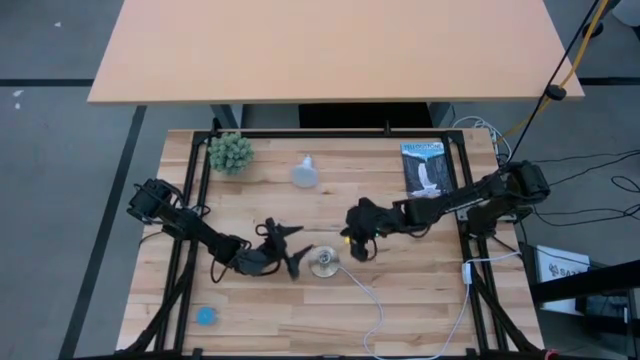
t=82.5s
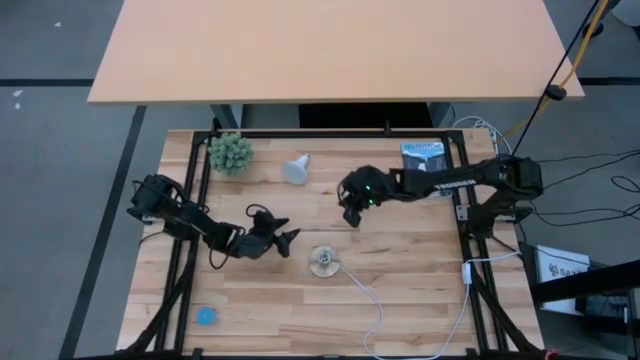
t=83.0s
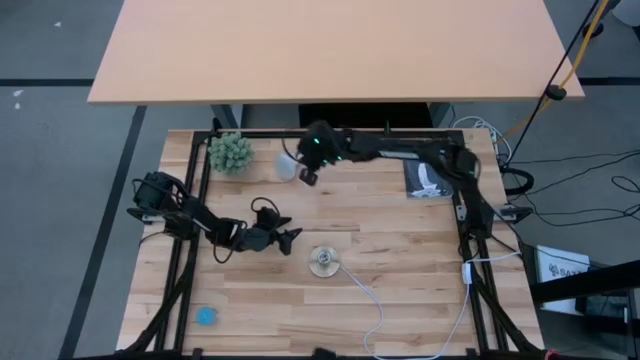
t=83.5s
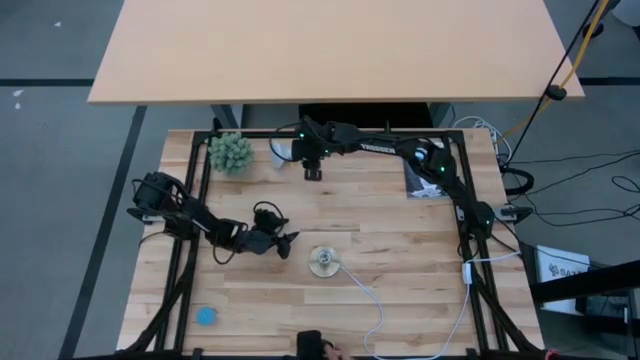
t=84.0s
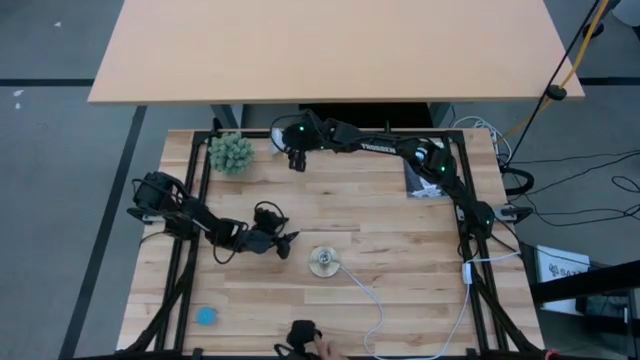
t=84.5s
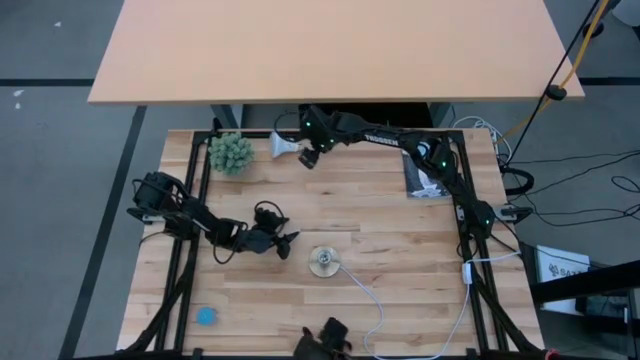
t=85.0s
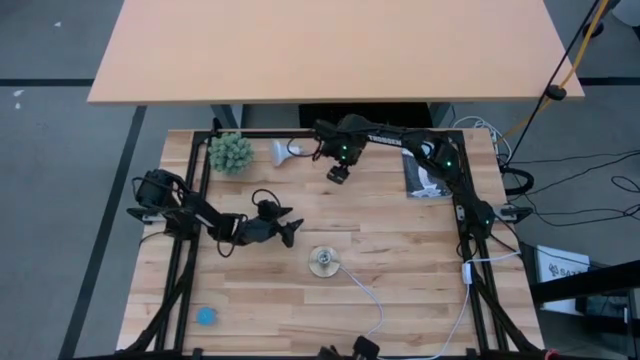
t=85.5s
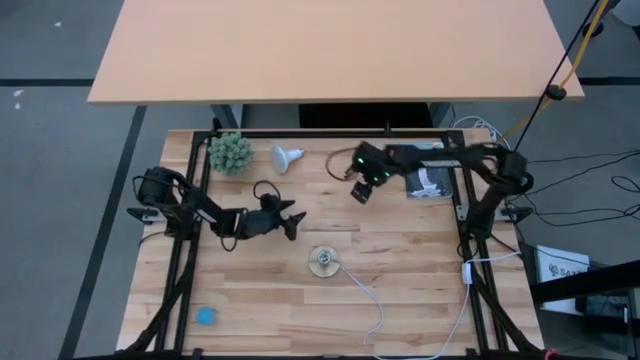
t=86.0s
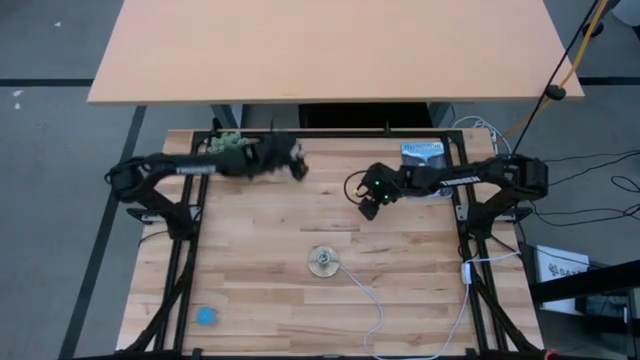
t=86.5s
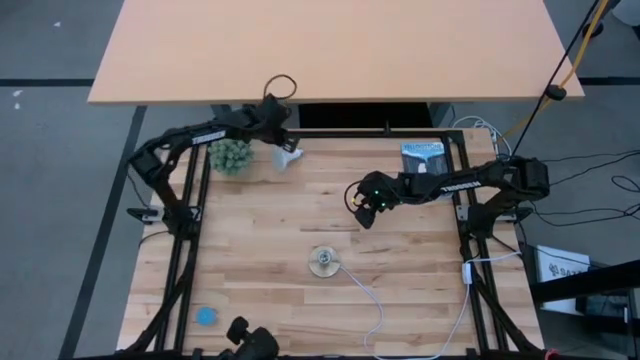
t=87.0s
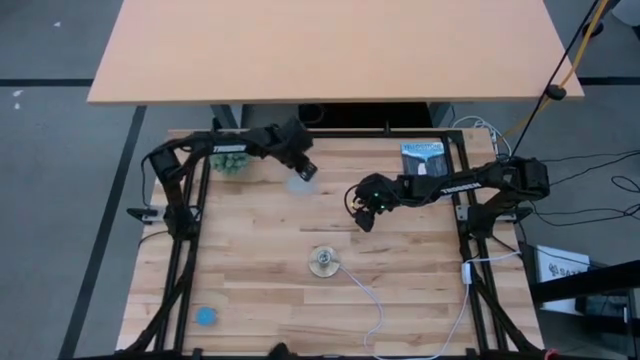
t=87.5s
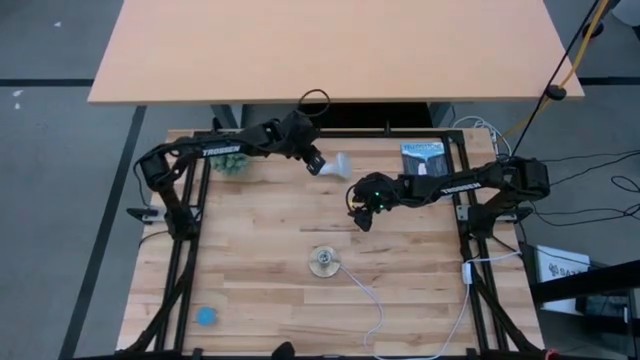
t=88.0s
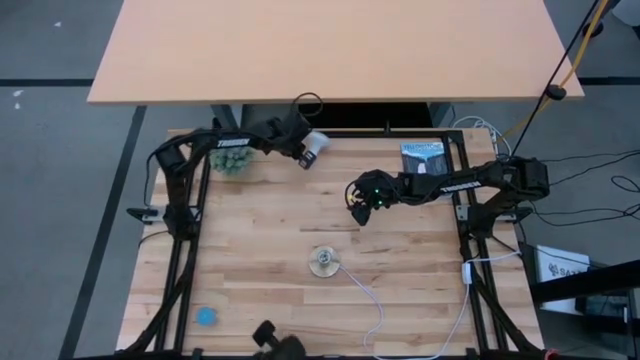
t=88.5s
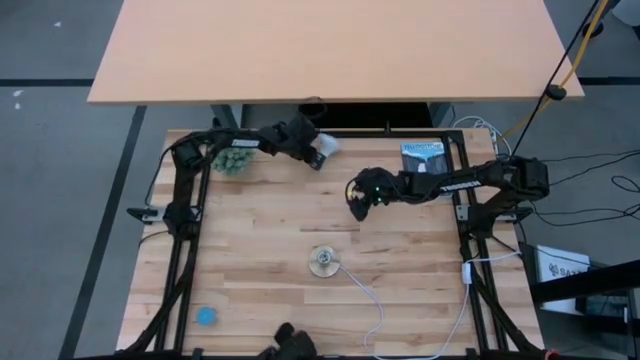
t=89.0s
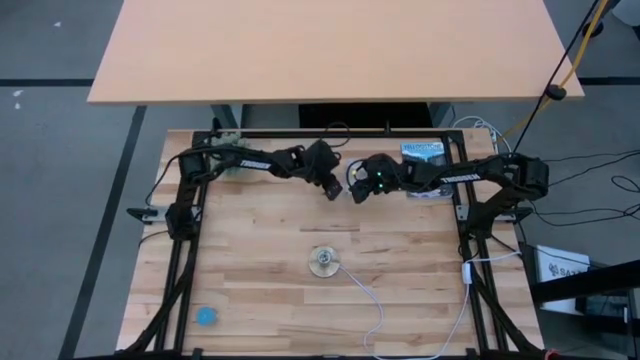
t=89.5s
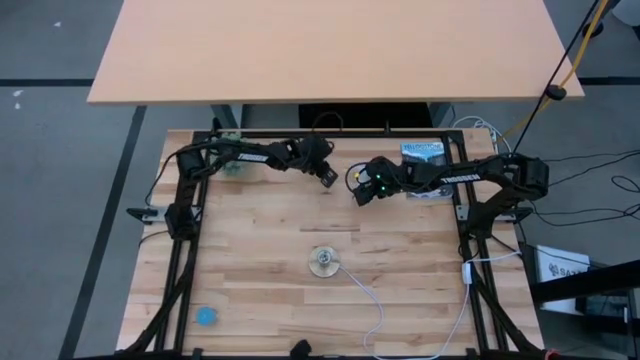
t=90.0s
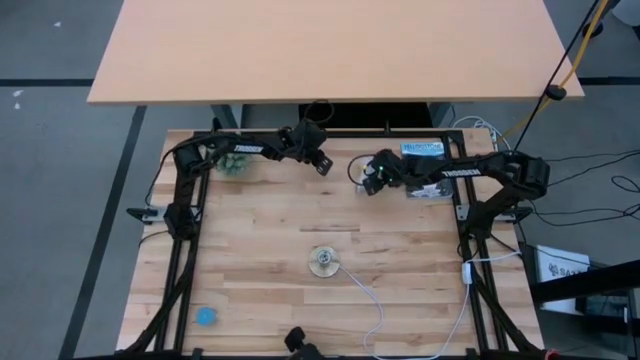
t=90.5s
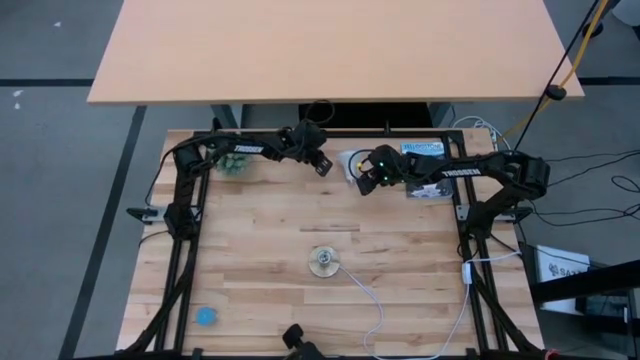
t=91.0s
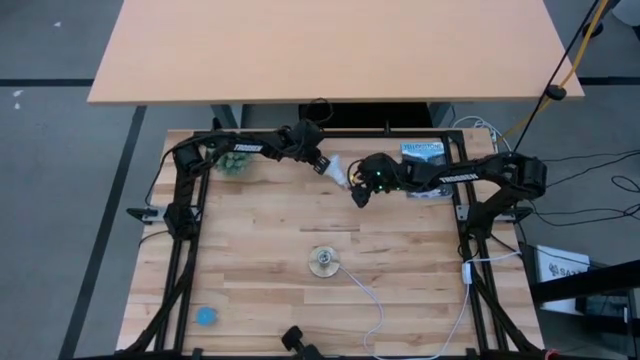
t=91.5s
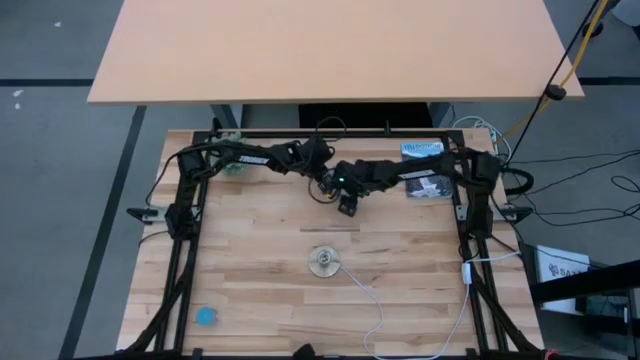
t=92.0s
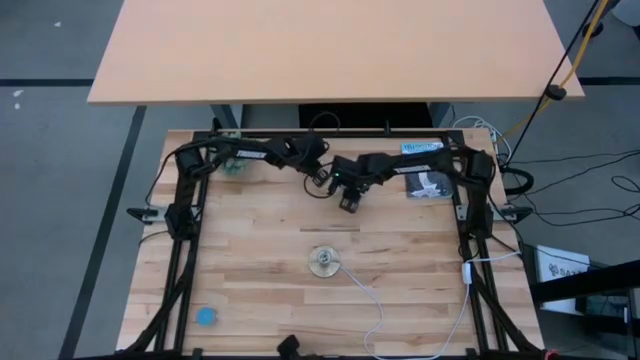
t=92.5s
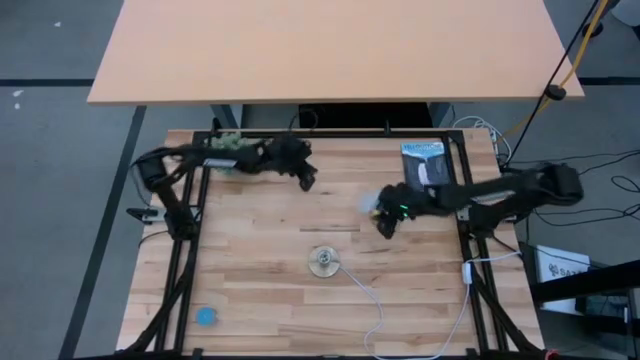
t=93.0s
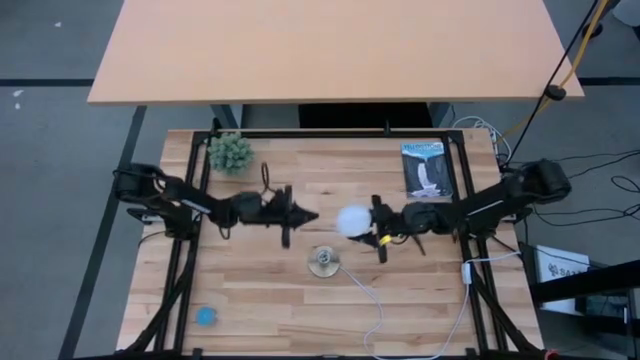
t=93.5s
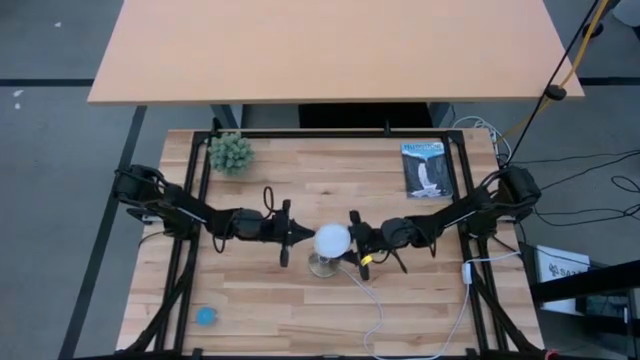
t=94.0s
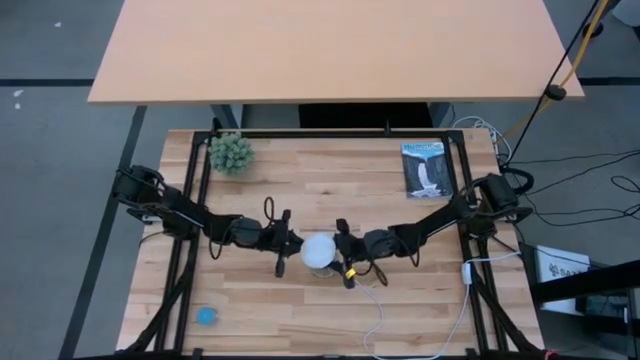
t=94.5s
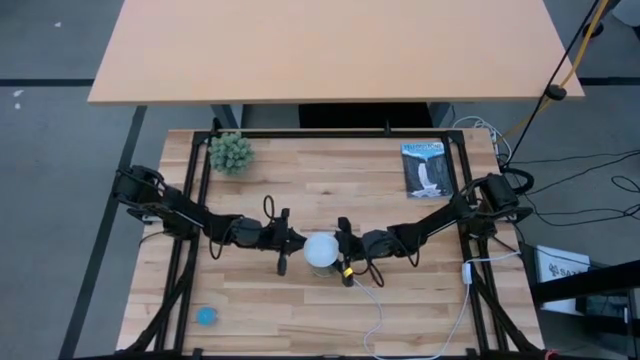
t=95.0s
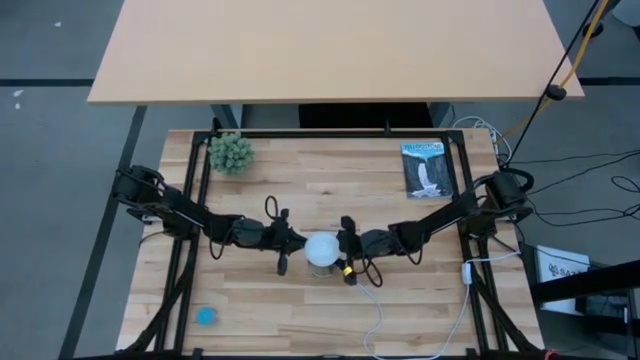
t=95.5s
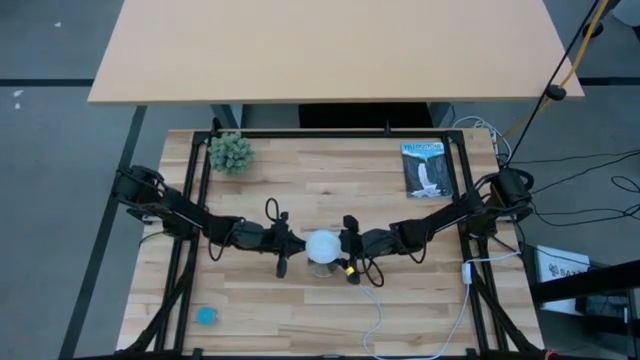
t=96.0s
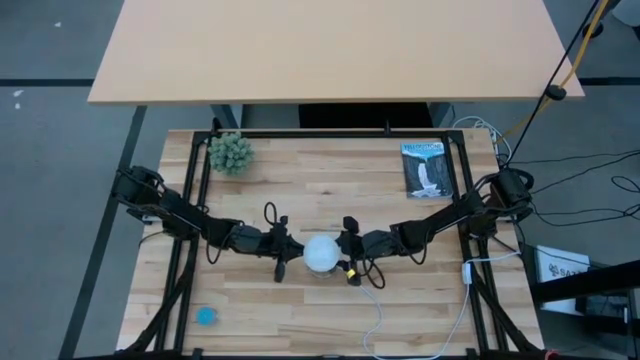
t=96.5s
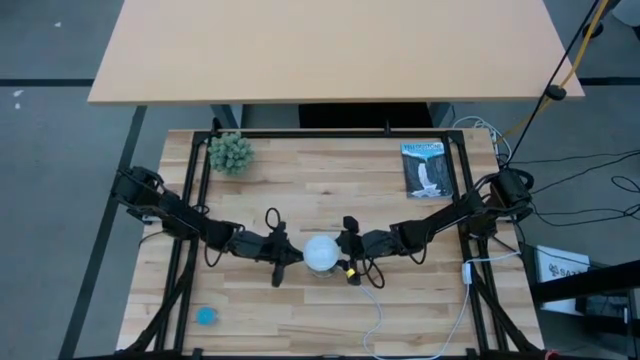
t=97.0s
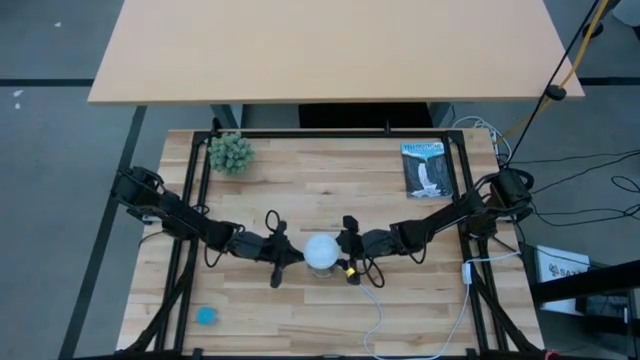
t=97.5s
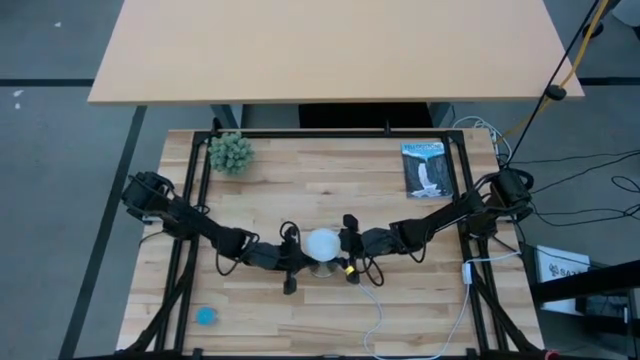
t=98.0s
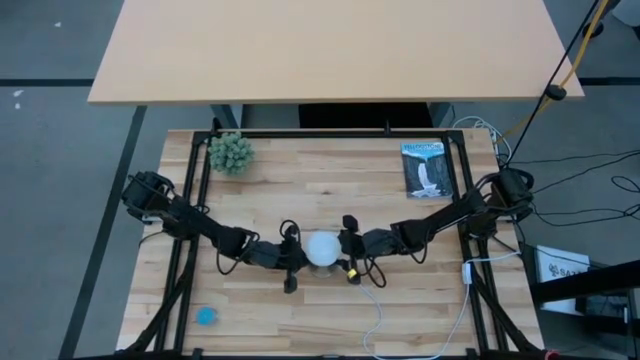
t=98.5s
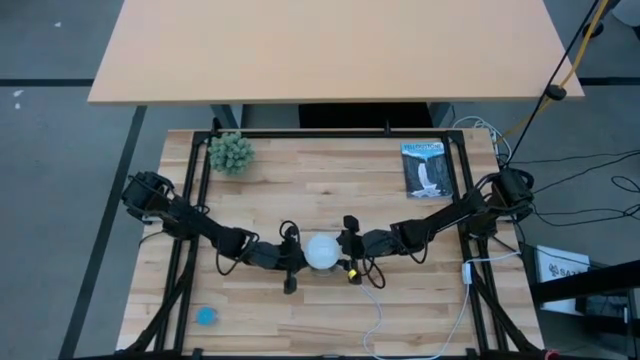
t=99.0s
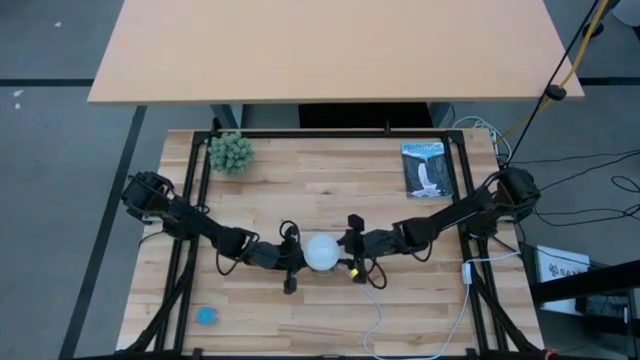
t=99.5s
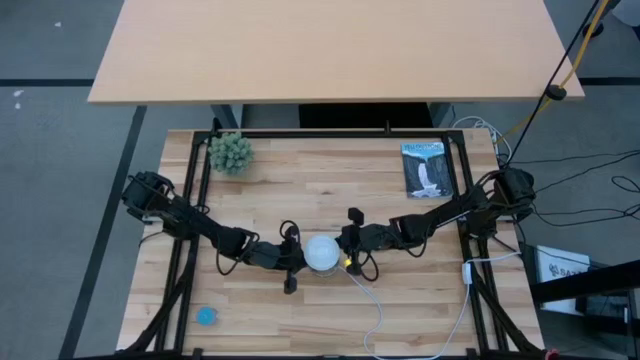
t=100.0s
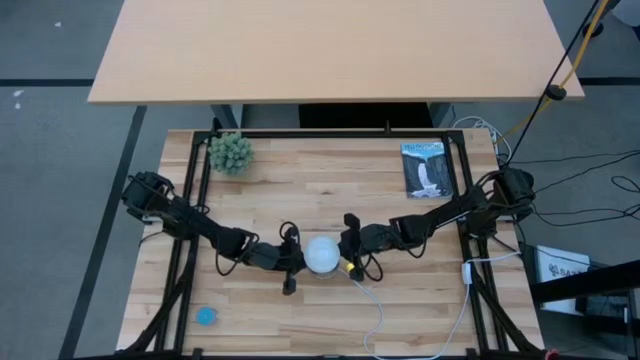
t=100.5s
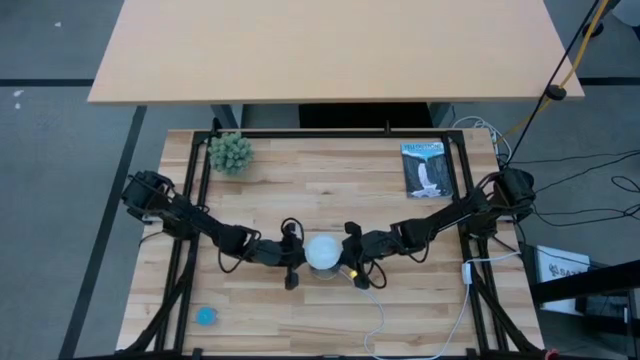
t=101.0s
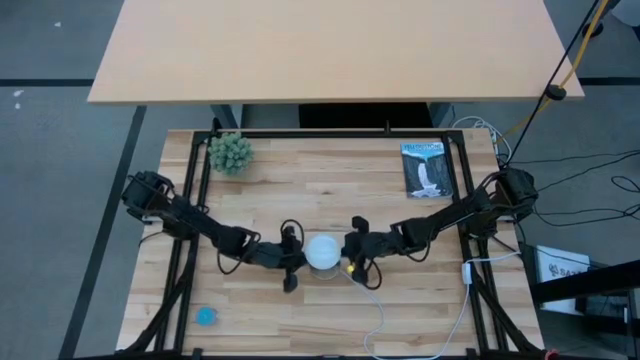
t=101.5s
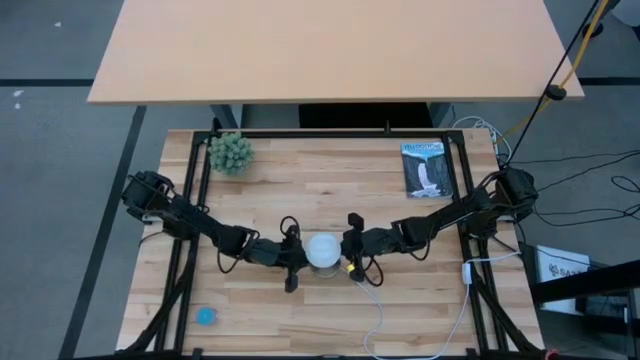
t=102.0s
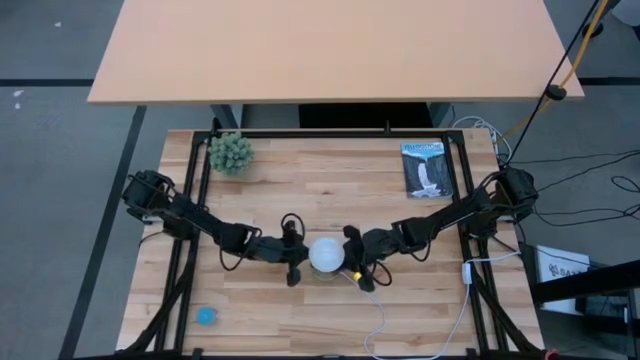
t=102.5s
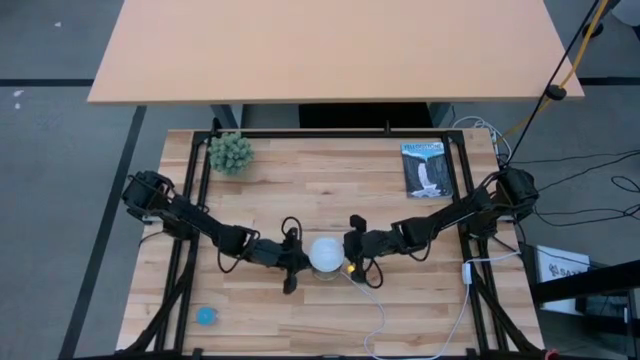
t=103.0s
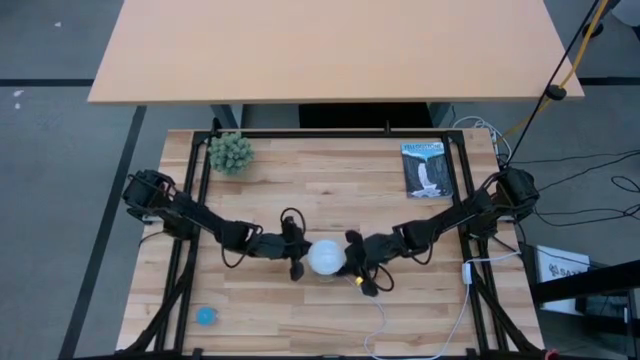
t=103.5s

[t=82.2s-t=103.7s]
Task: Screw lightbulb
Insert the white lightbulb into the desk lamp

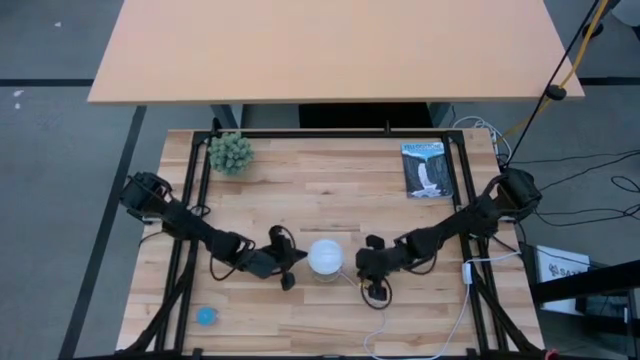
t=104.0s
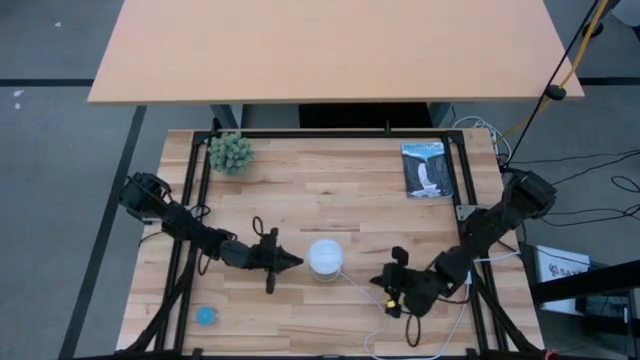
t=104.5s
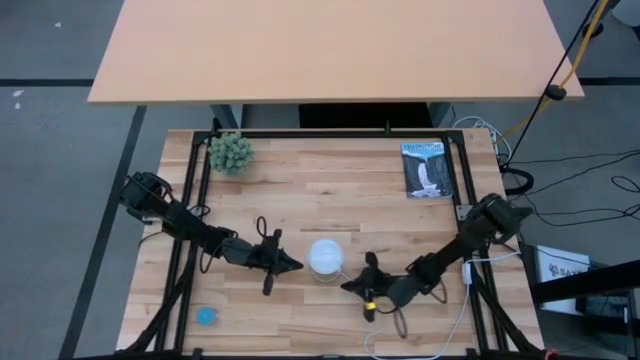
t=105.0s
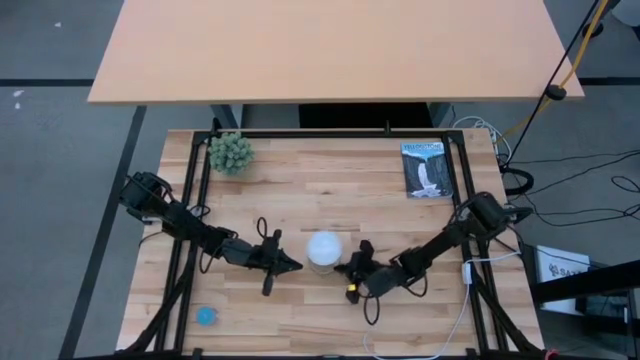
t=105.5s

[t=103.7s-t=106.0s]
Move the desk lamp to the center of the table
